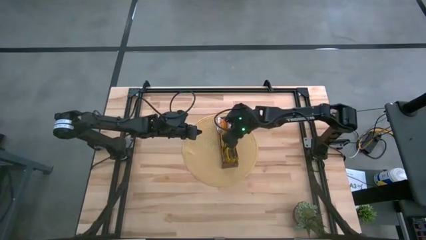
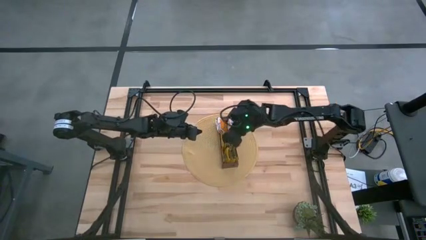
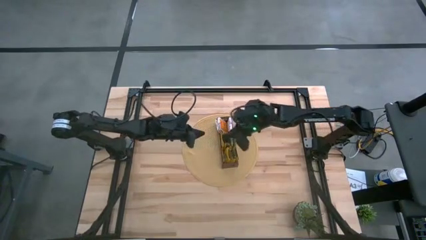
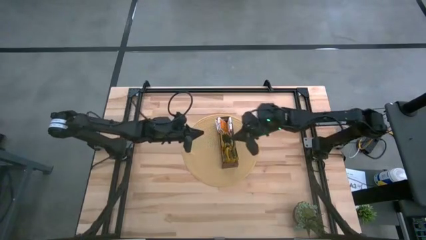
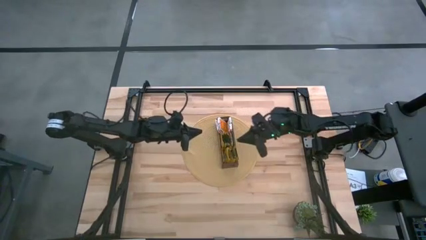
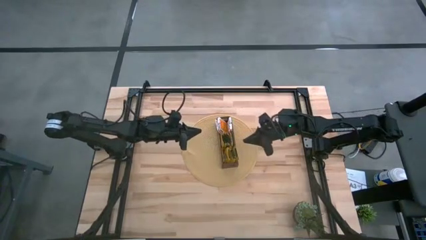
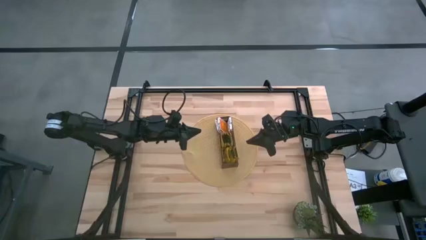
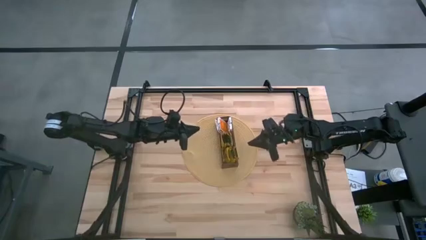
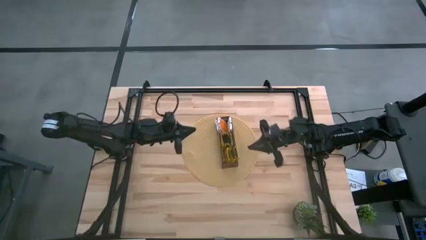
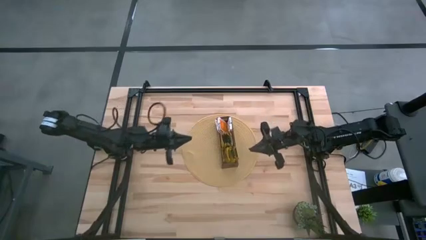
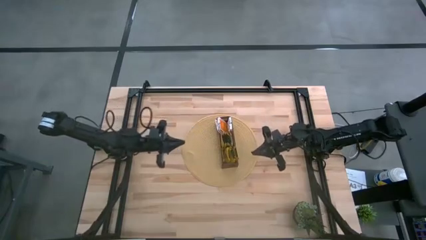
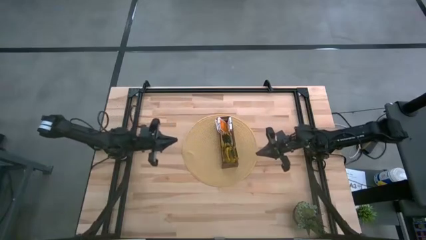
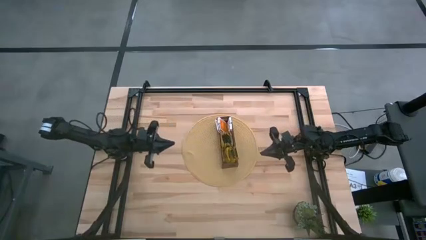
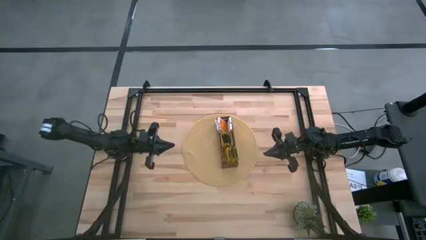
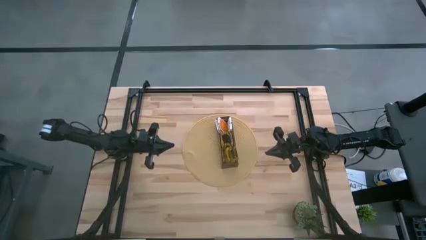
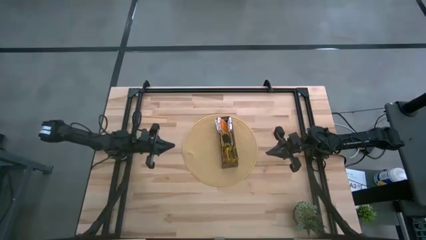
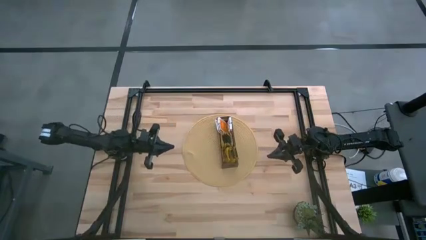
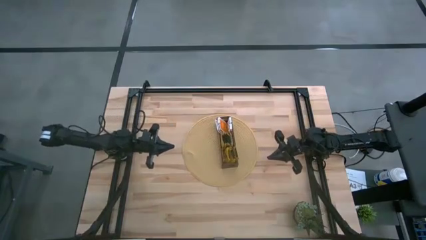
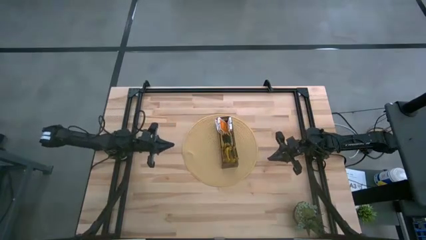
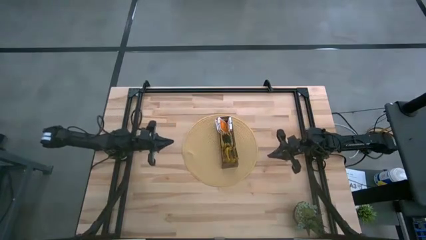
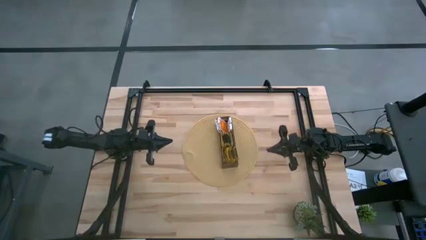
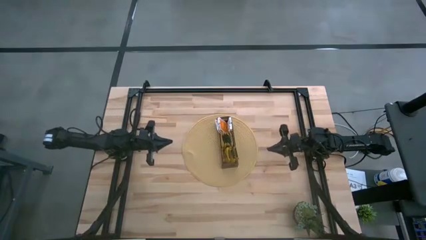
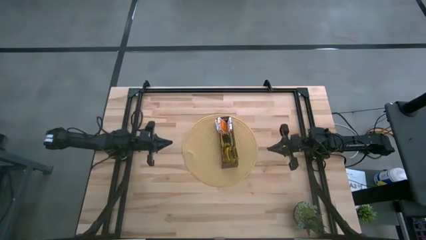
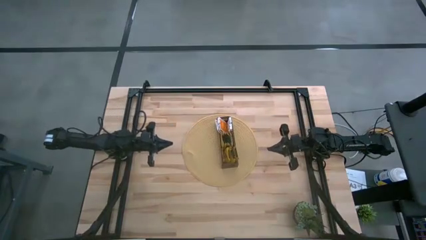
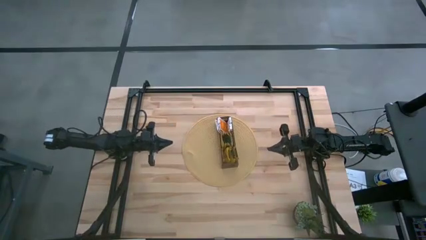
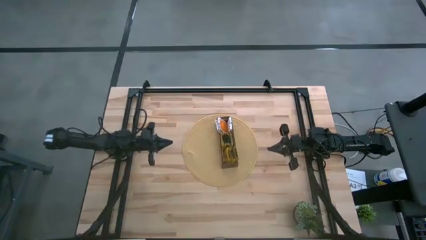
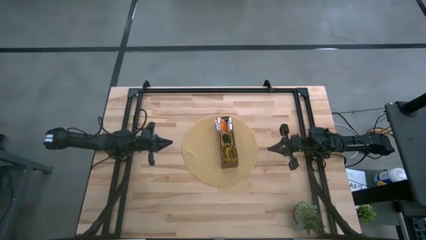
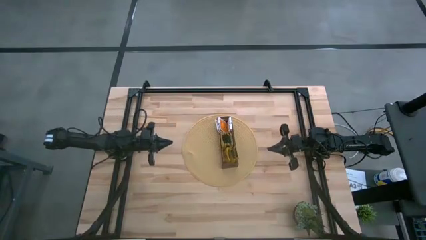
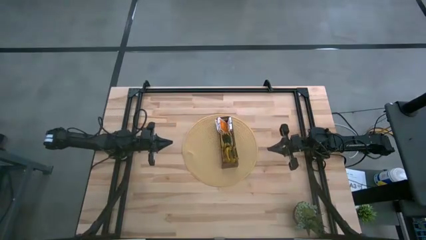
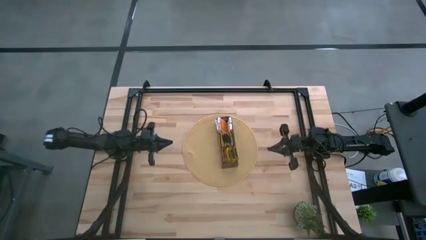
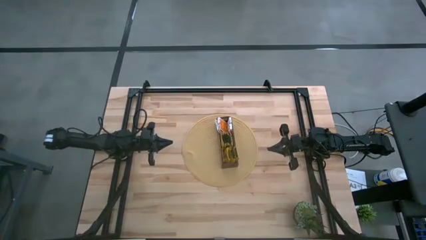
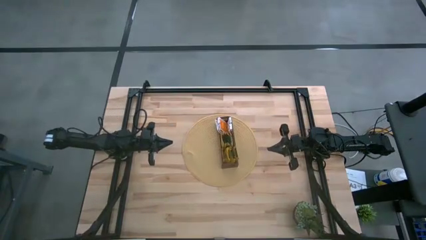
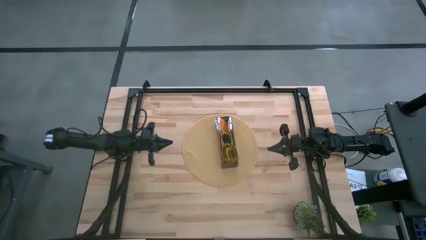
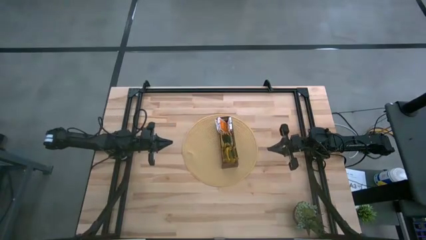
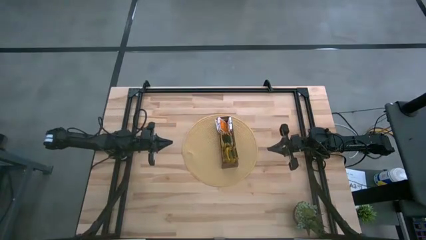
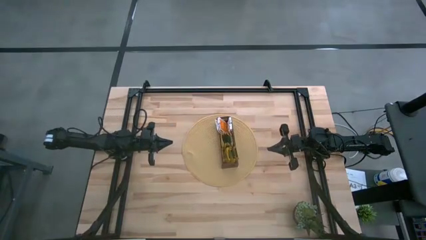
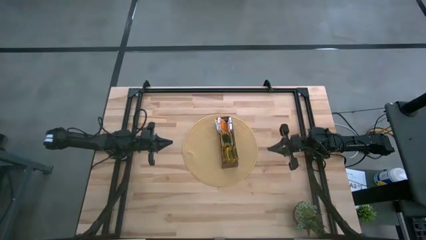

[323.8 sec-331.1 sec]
Task: Pick & Place Tea
Return to Home Position

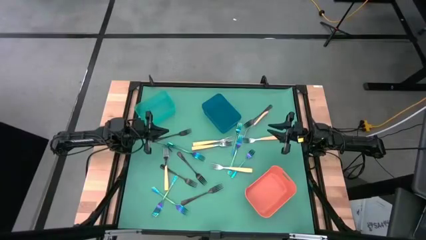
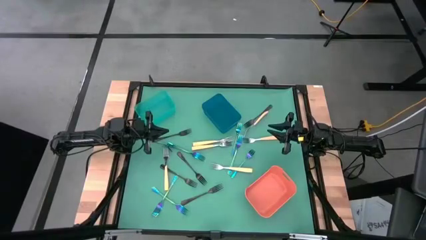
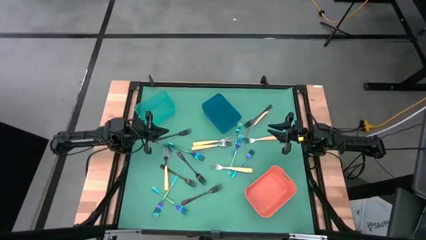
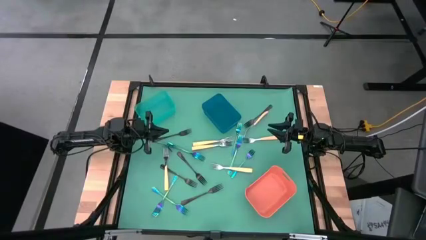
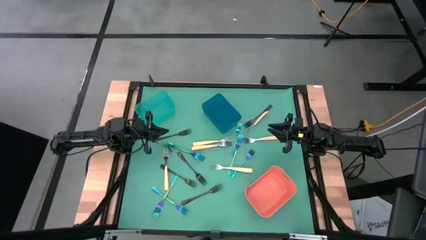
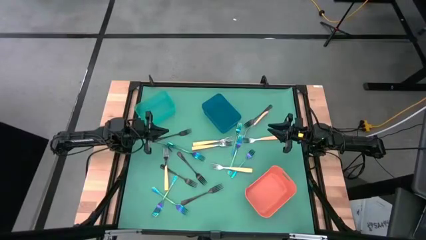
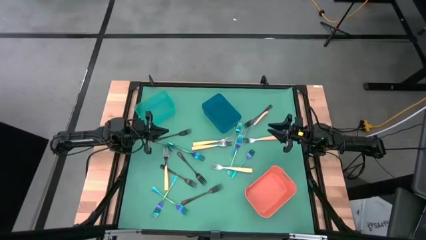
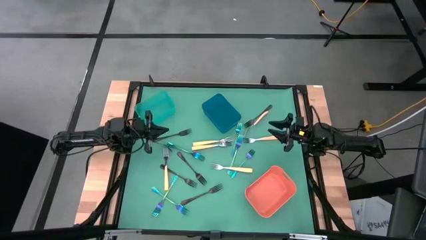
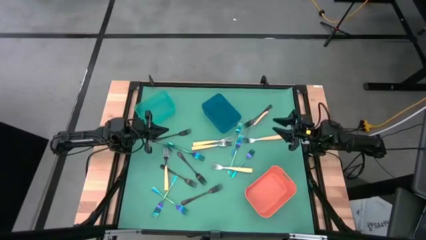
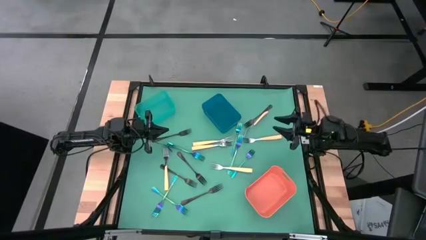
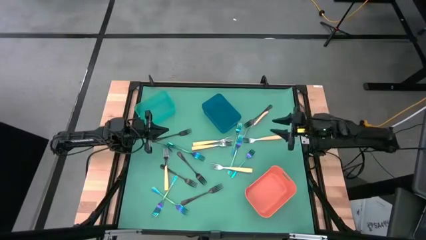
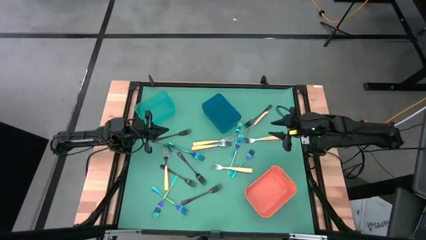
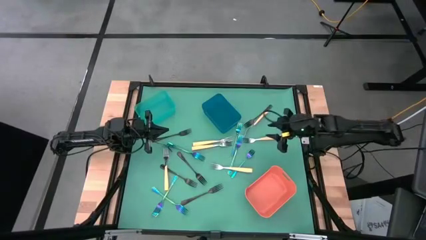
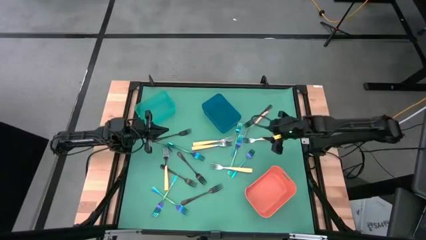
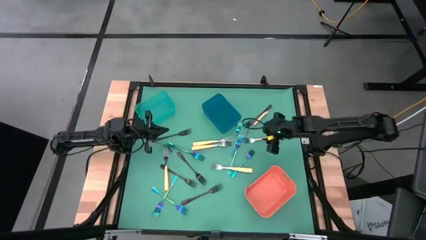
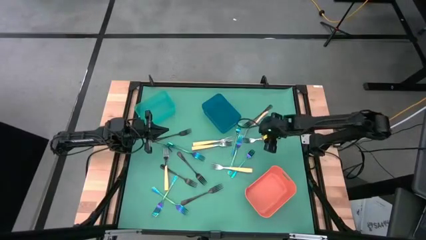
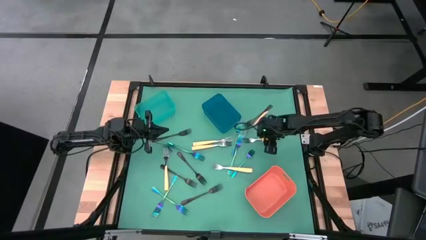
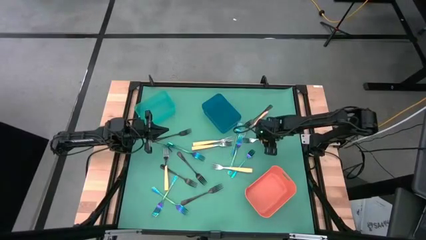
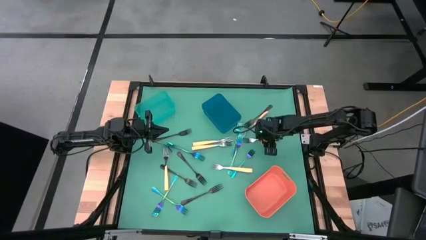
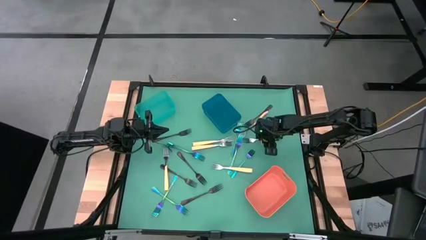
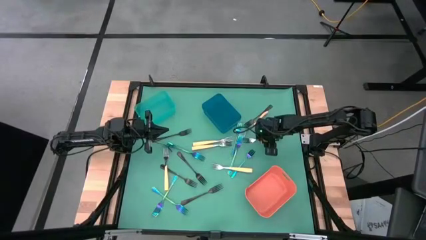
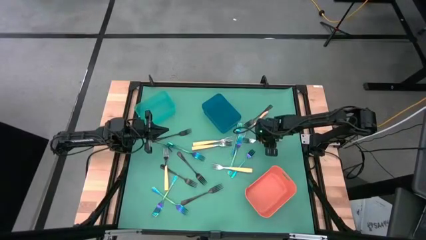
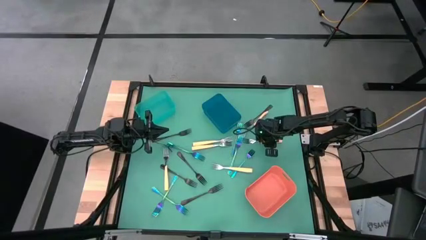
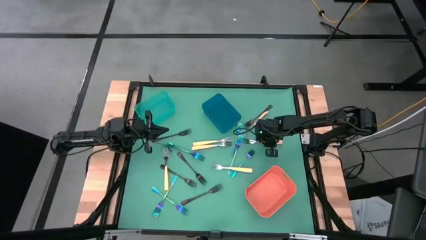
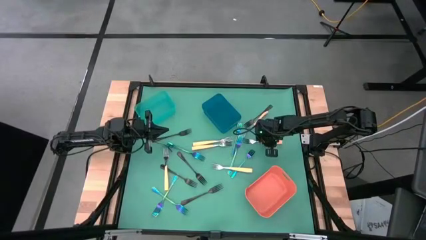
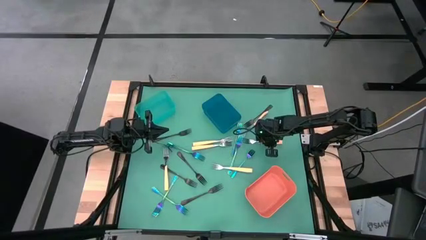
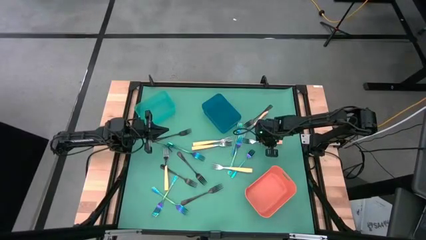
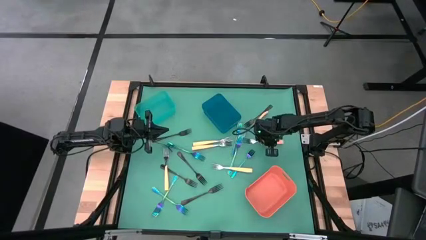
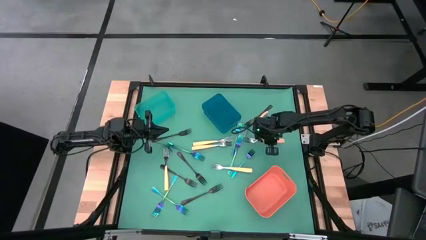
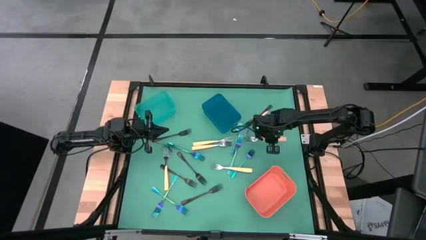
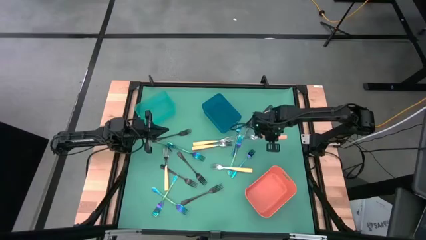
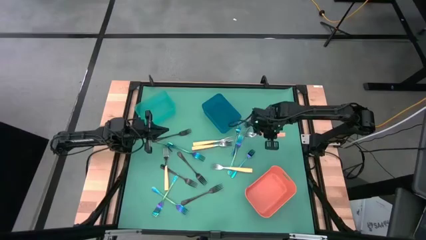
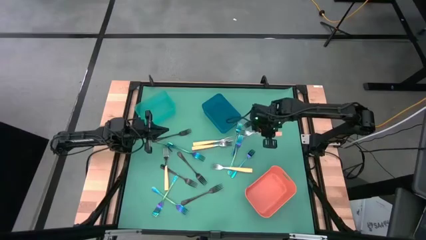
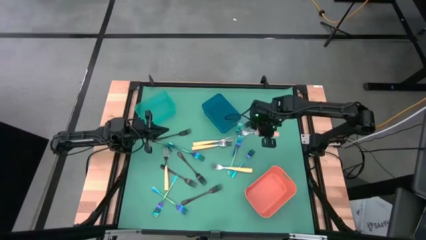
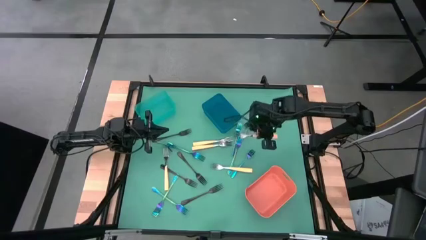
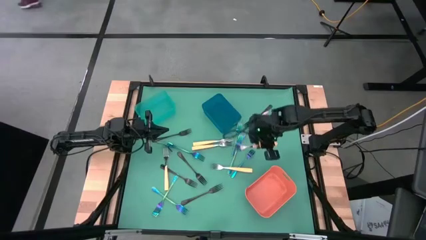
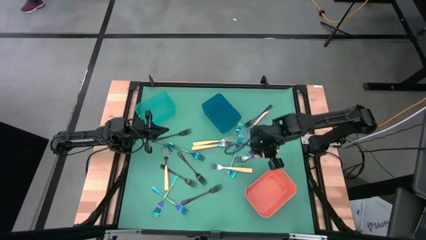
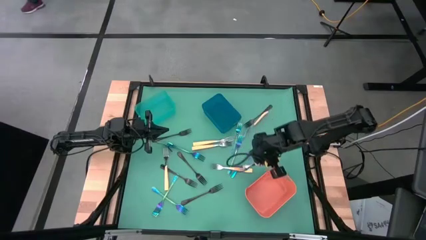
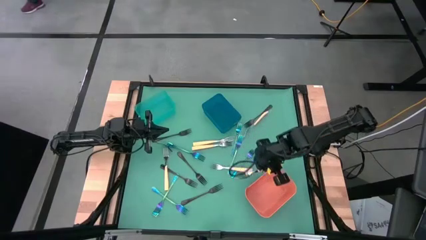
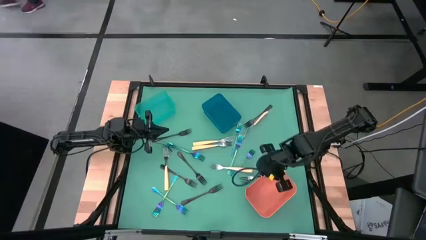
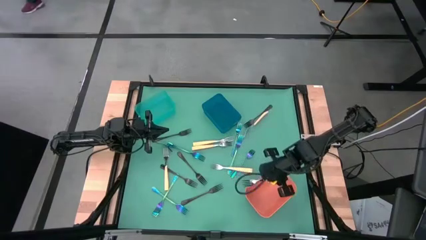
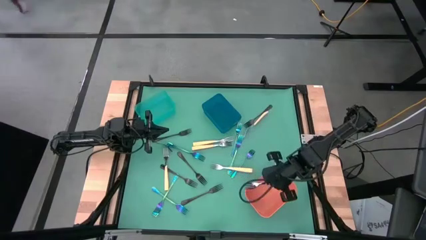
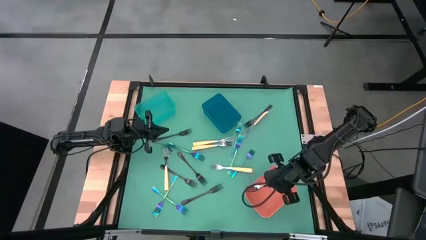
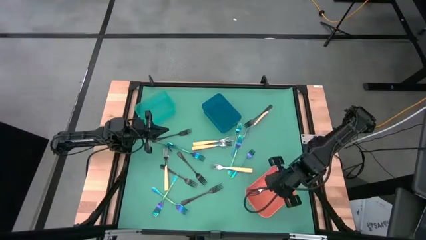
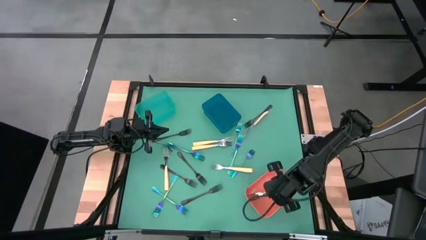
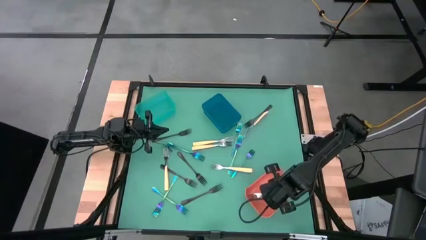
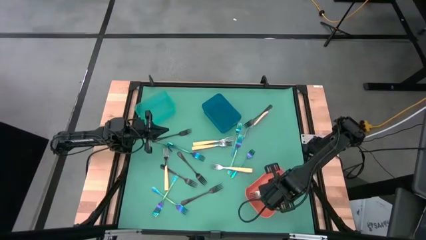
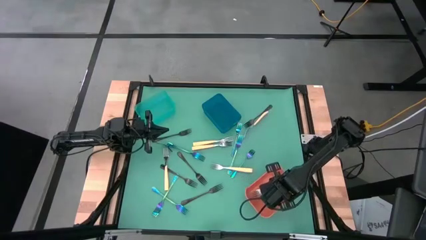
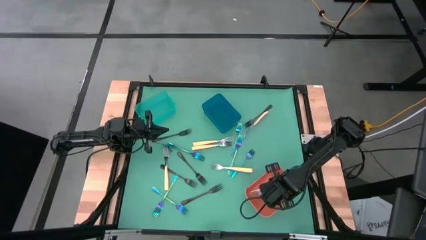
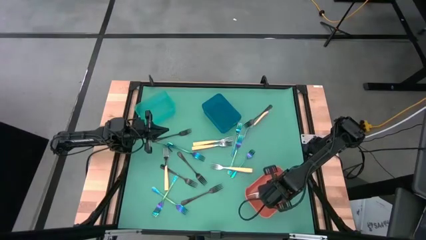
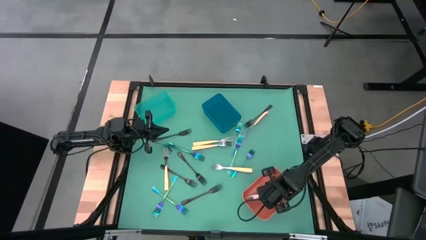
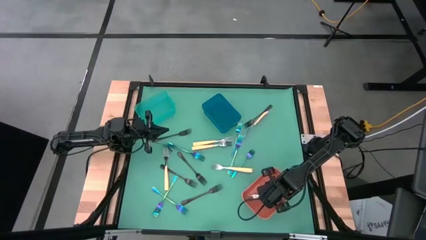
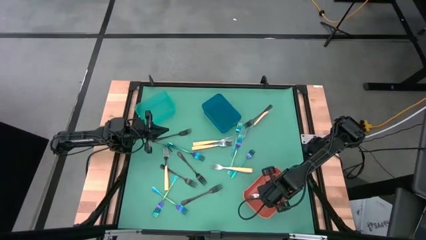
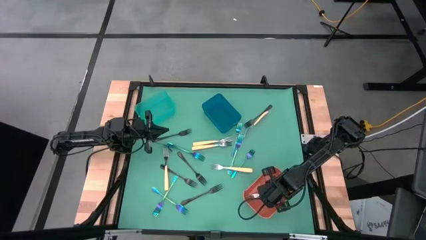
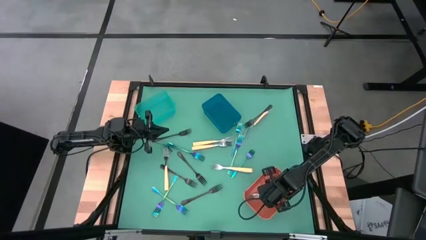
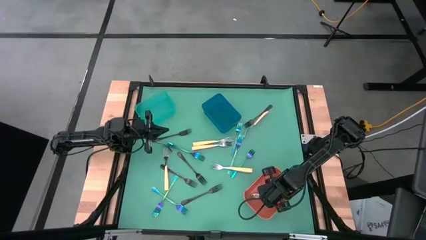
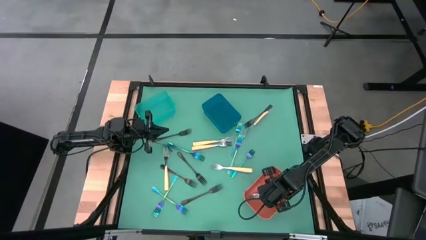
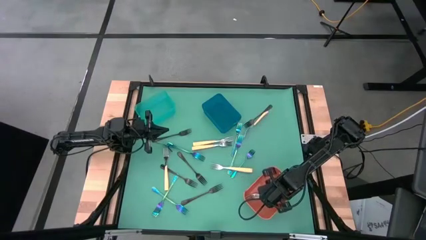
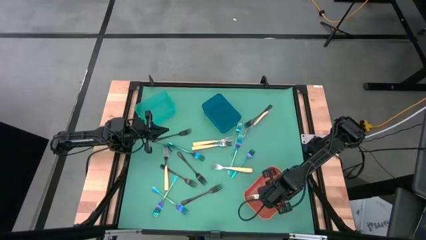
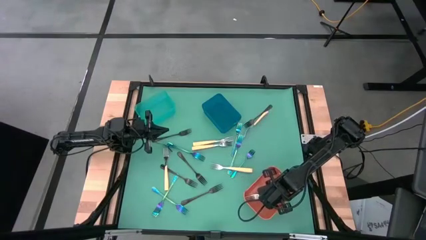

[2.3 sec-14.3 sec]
Task: Sort silverware by color (type)
Put the orange fork into the orange bin
